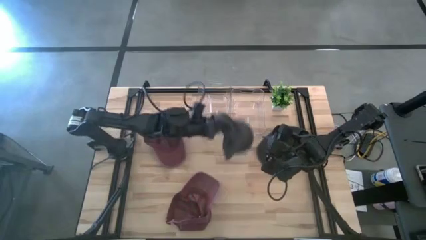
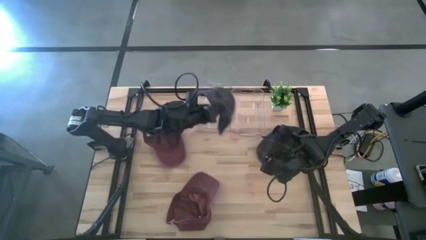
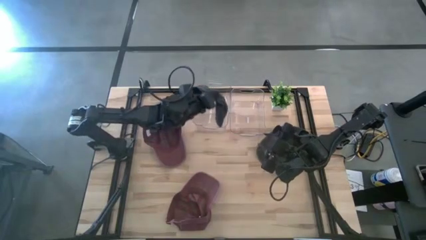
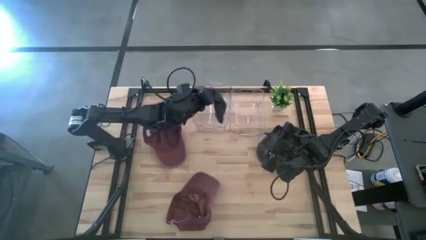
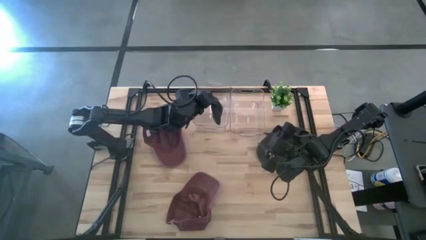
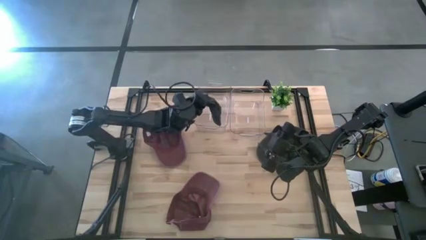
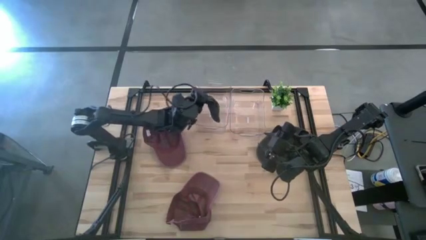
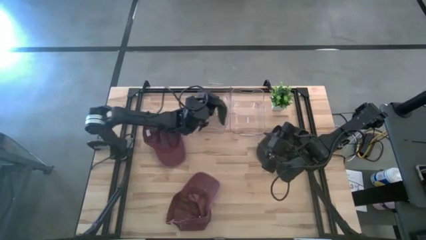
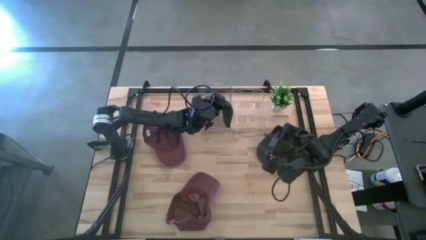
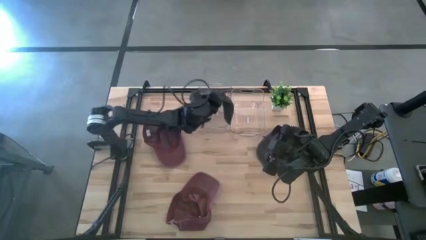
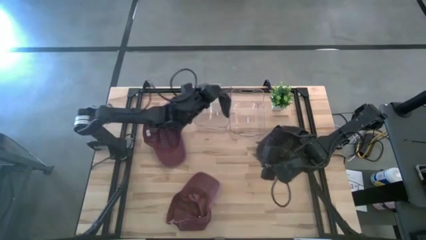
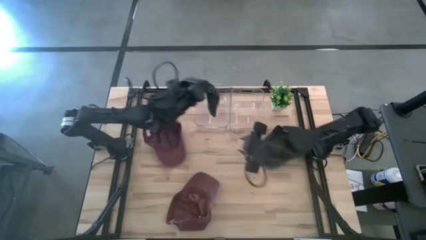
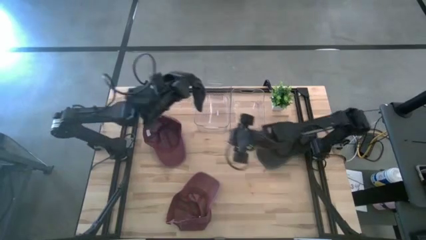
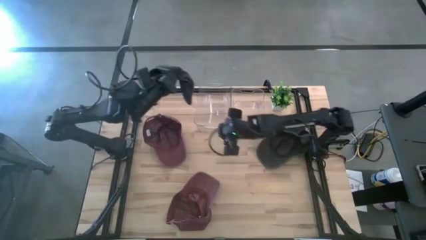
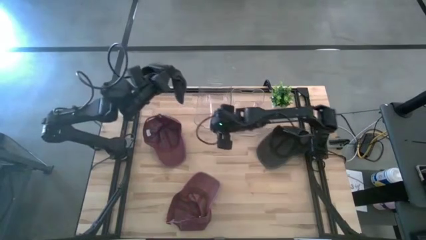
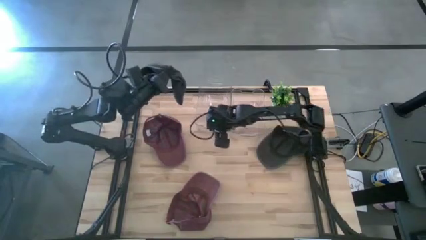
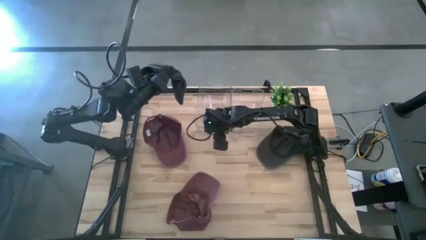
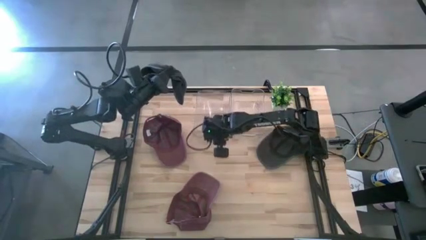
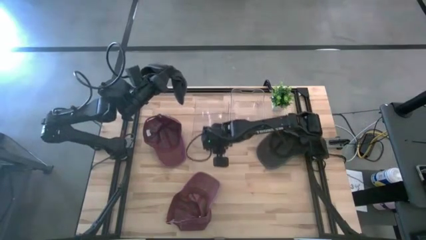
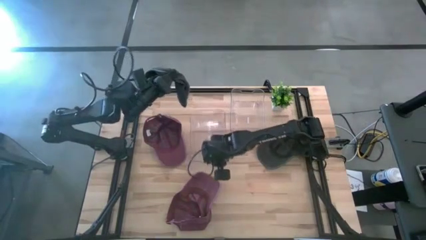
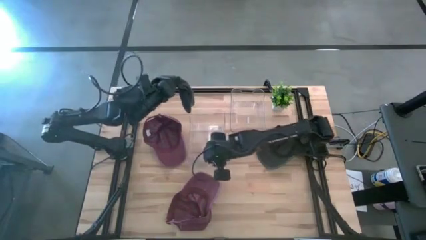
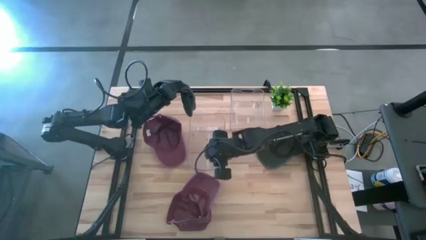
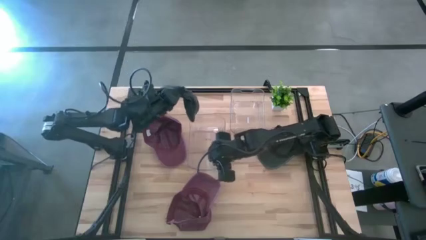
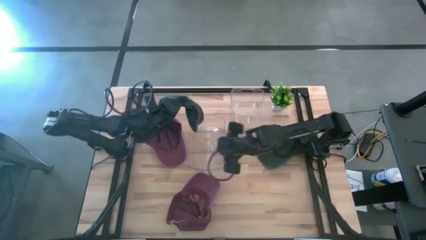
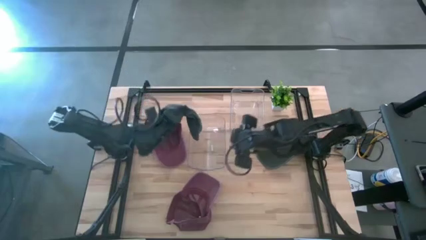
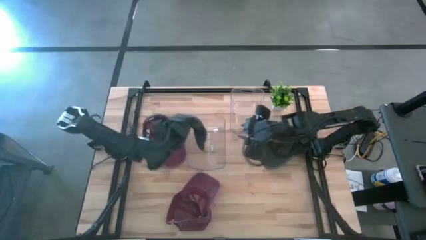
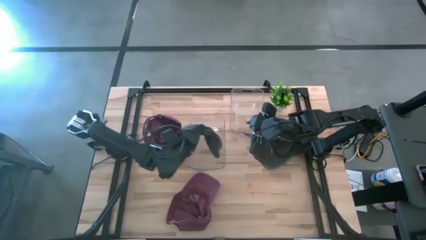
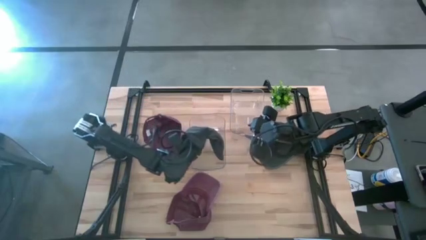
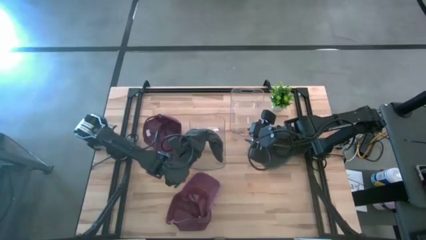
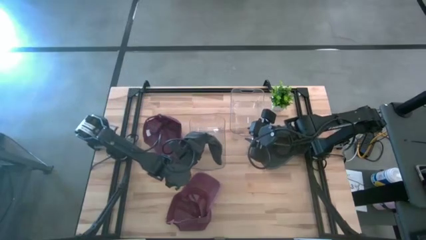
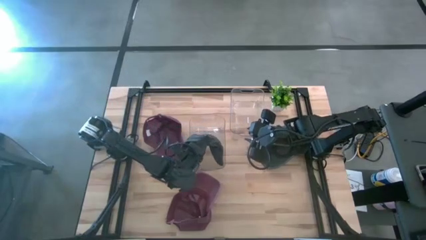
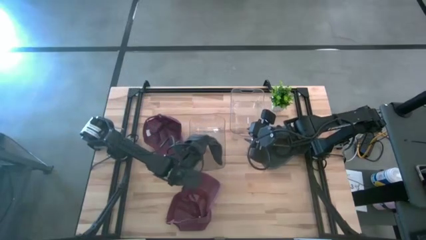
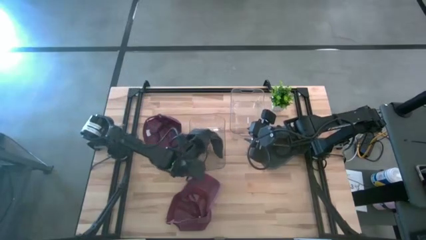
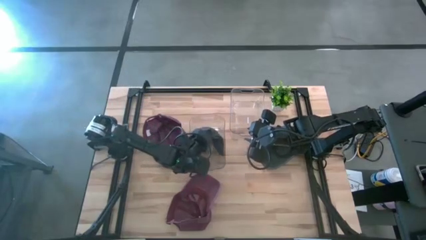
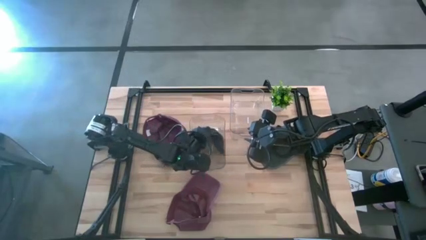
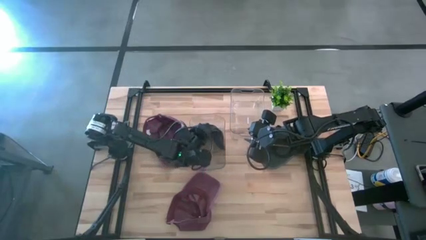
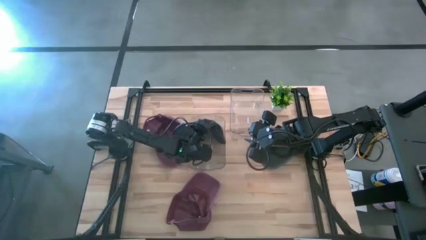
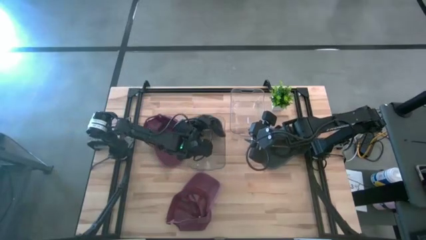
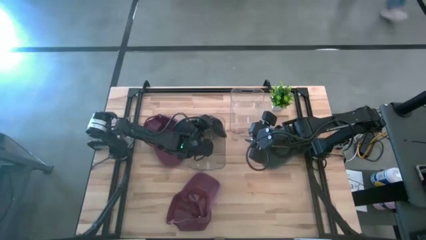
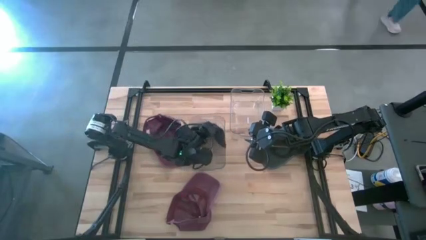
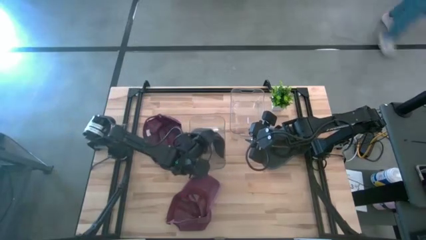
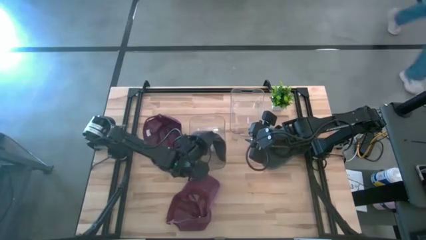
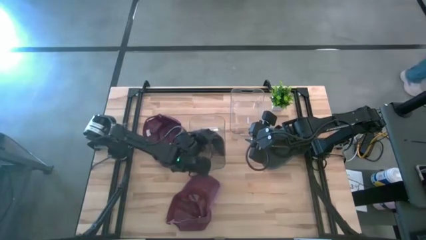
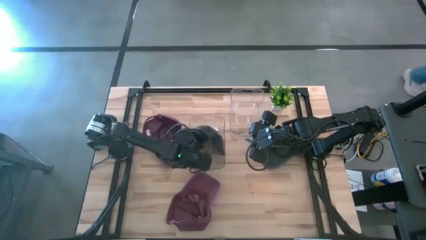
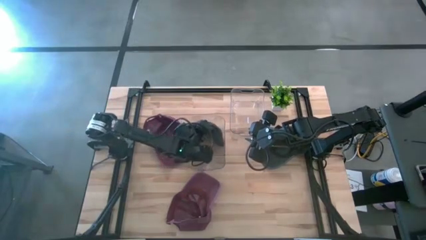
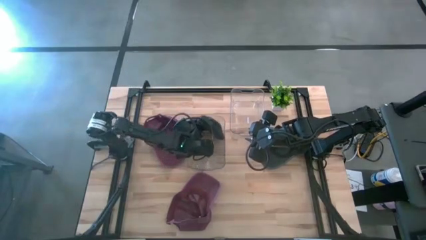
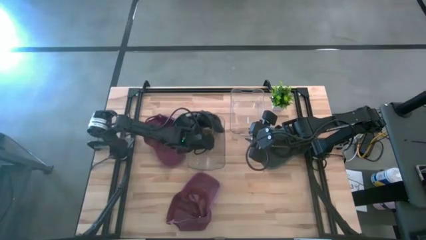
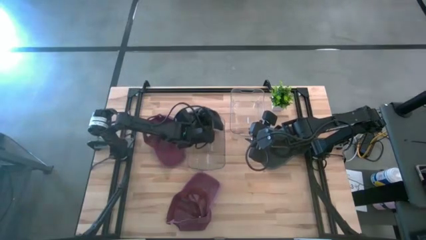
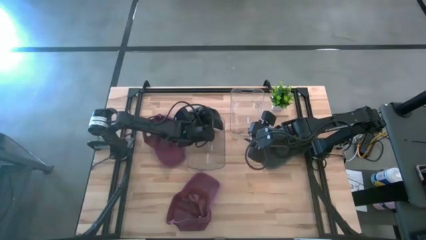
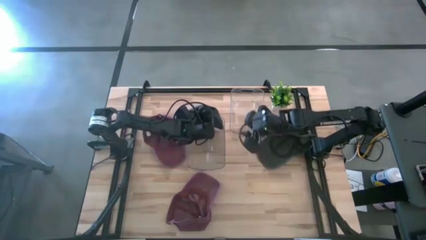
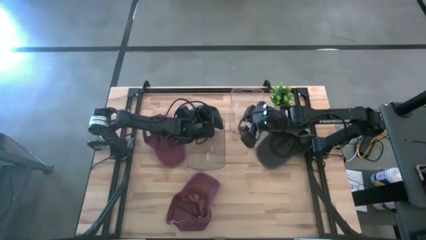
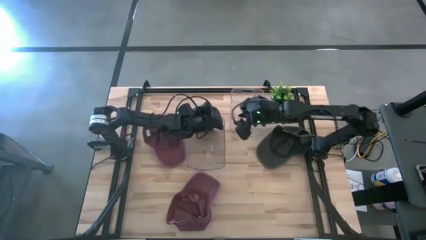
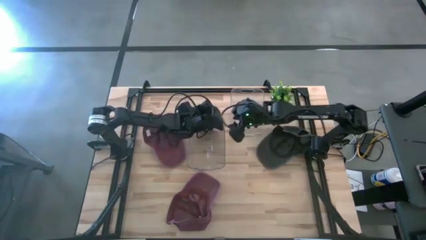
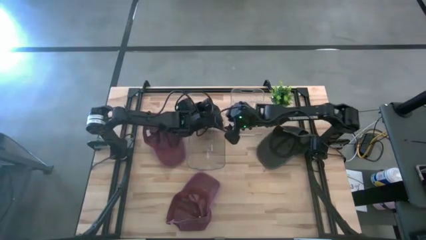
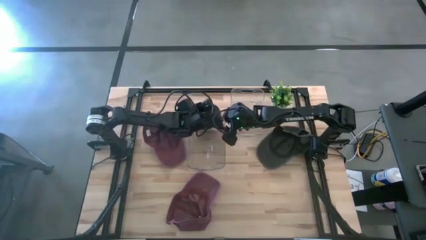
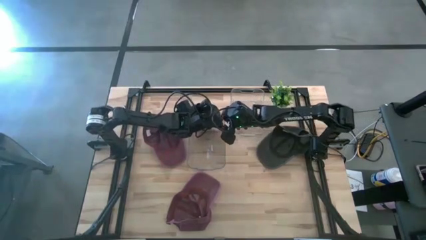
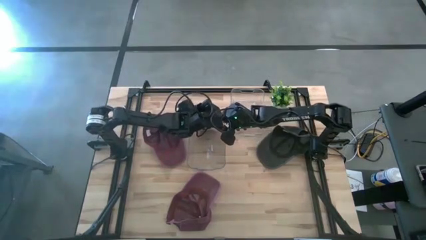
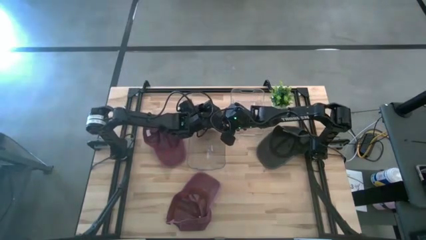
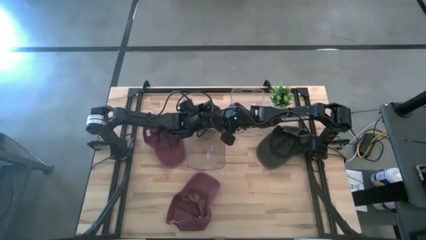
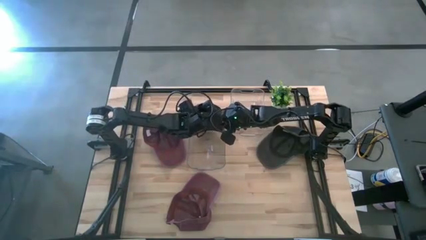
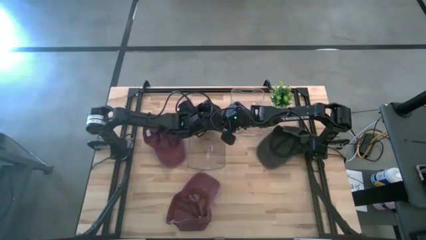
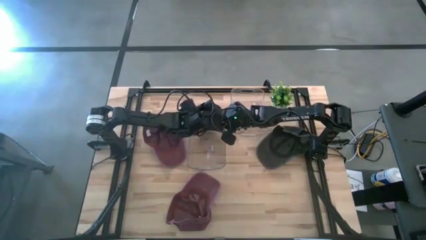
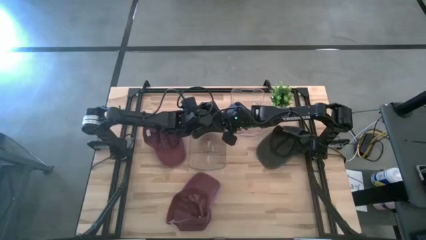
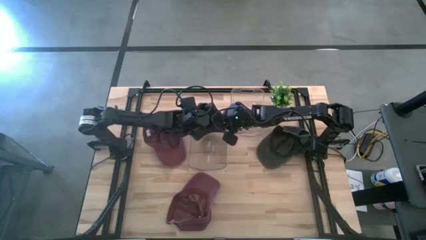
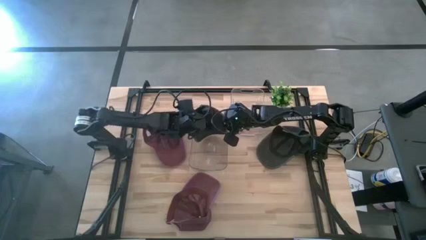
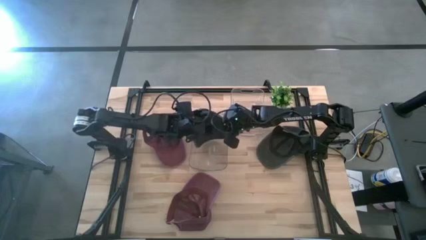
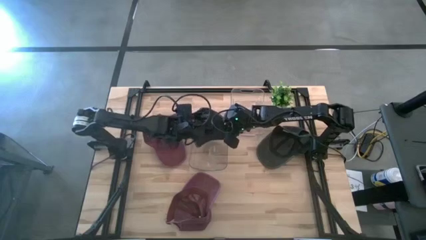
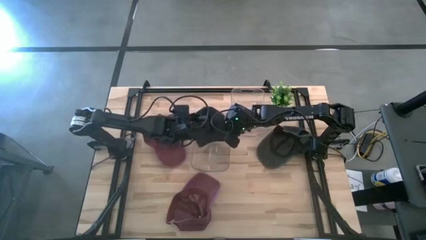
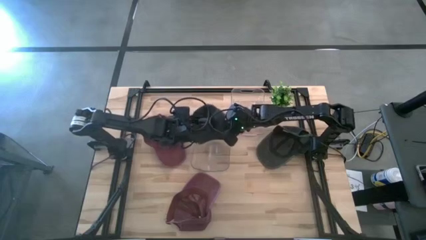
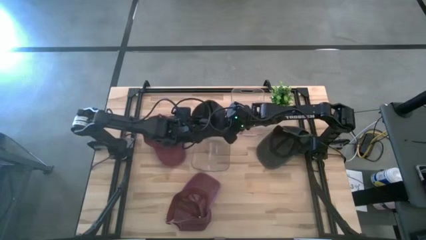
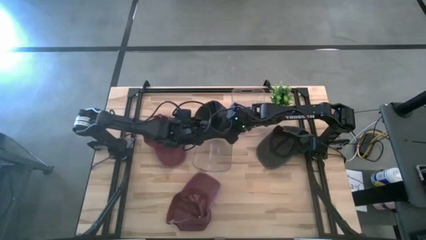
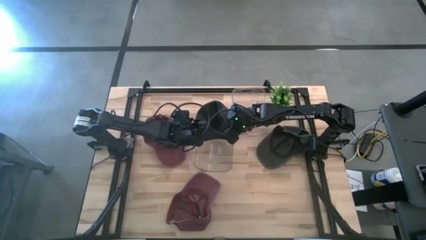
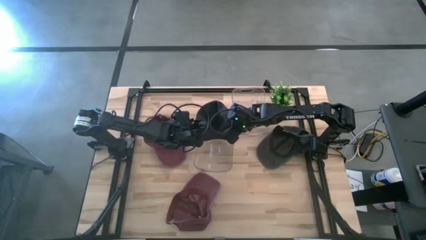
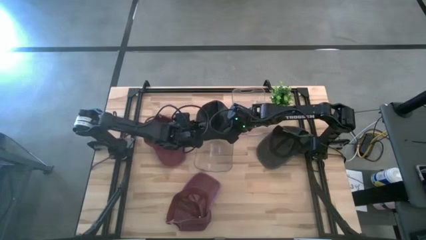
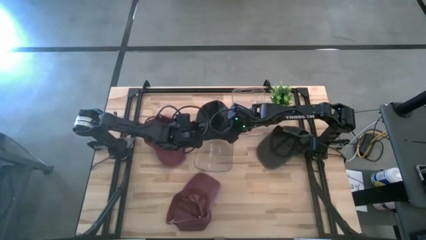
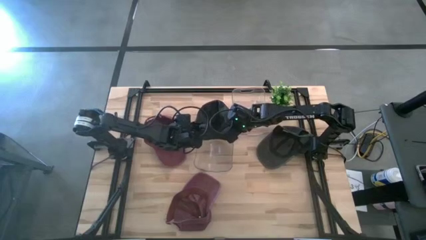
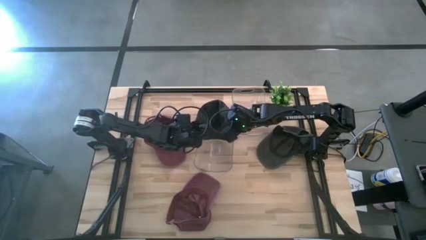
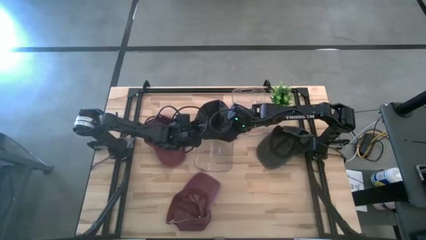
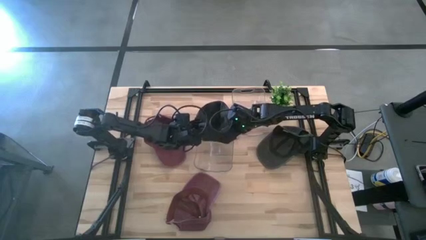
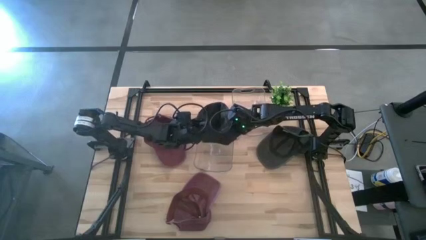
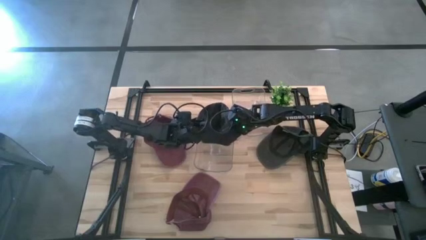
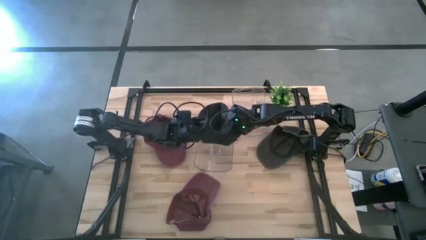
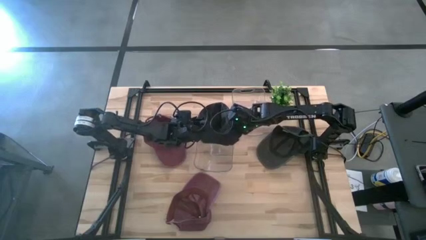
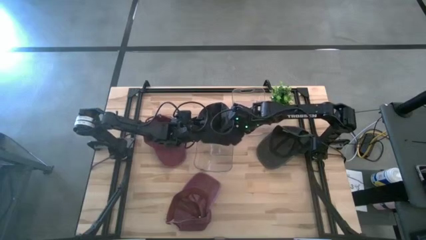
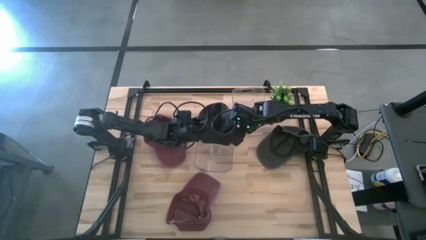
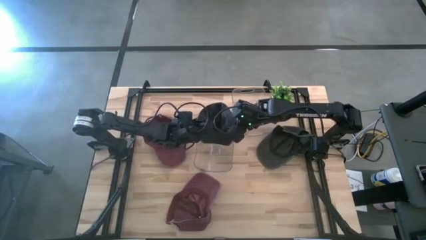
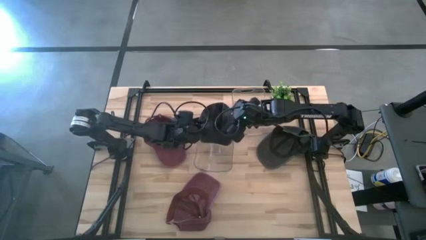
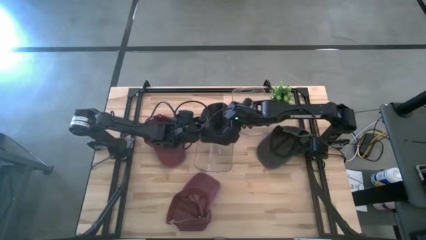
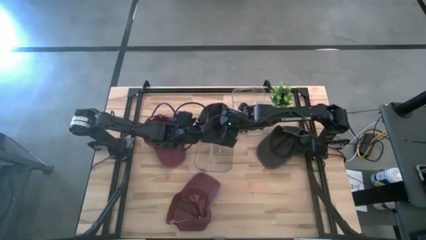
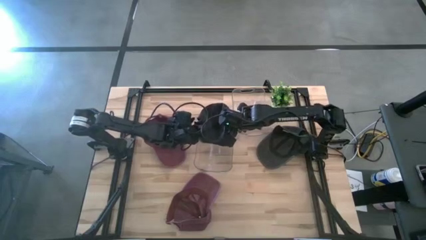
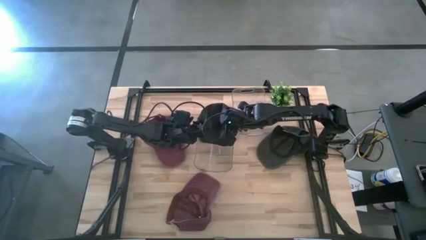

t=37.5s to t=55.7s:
Task: Pick & Place hat
Put the left black cap into the left transparent bin
